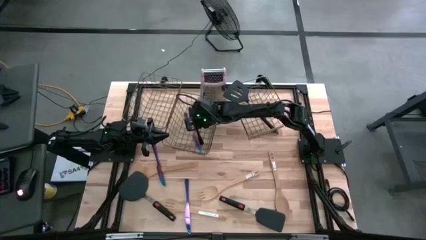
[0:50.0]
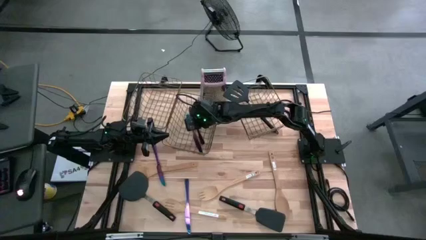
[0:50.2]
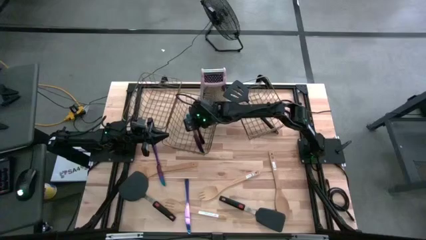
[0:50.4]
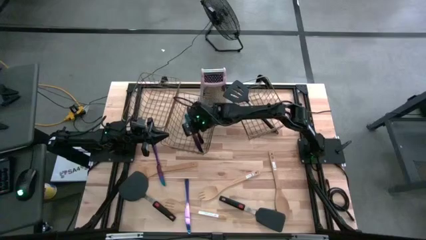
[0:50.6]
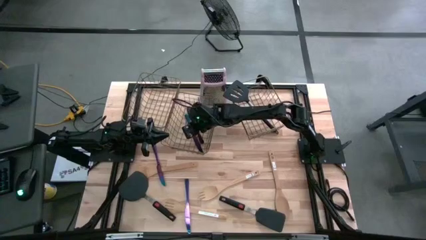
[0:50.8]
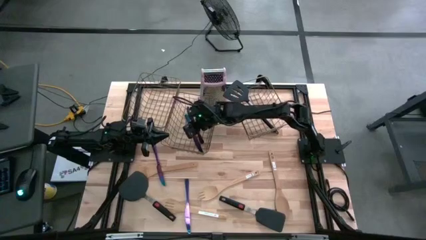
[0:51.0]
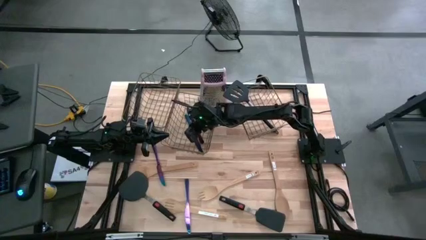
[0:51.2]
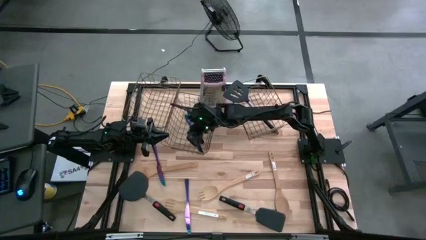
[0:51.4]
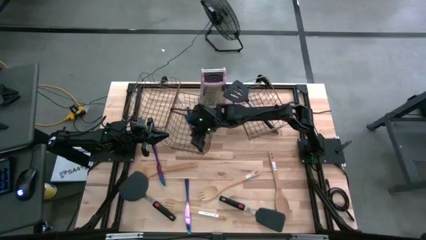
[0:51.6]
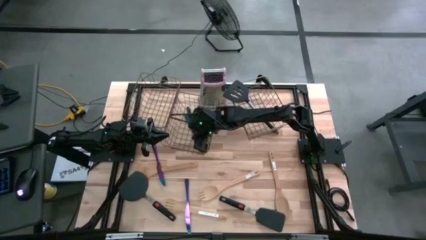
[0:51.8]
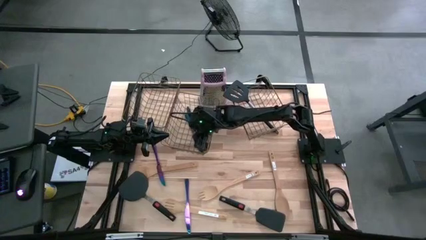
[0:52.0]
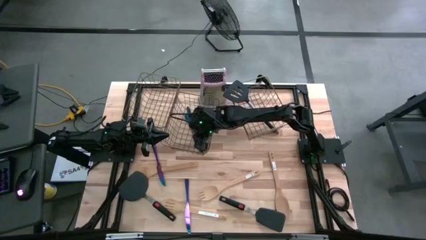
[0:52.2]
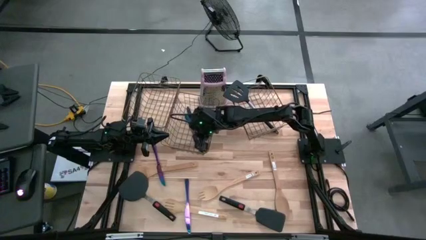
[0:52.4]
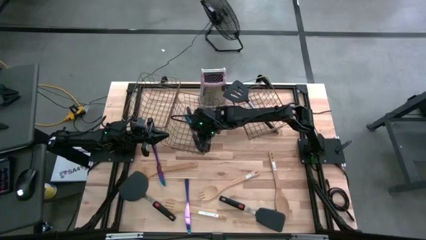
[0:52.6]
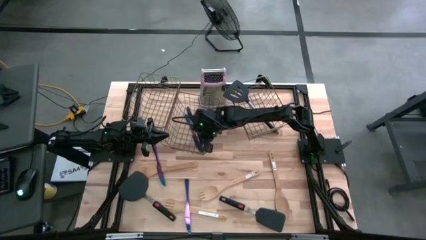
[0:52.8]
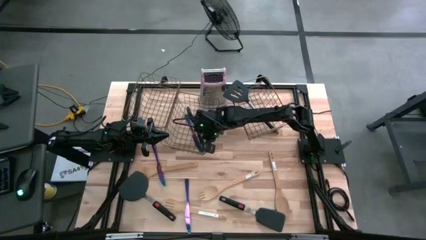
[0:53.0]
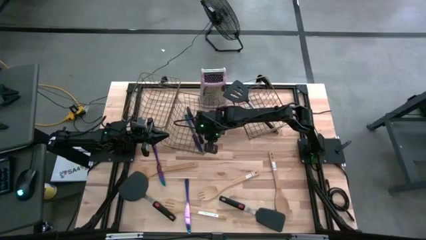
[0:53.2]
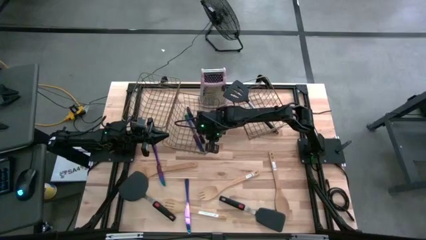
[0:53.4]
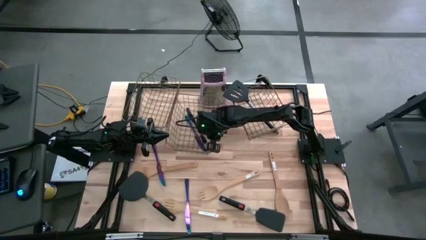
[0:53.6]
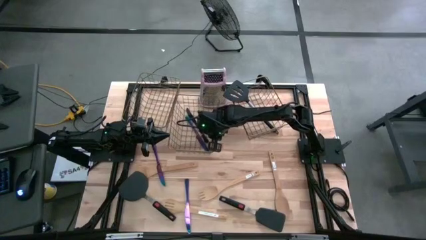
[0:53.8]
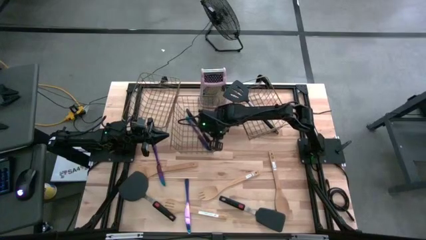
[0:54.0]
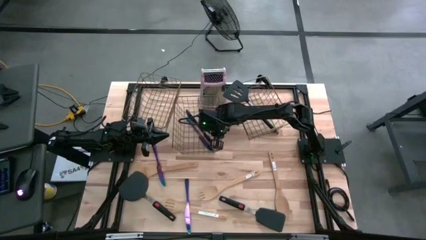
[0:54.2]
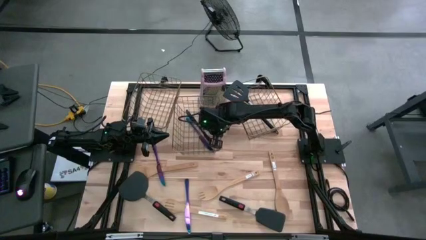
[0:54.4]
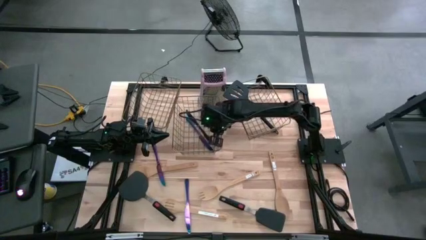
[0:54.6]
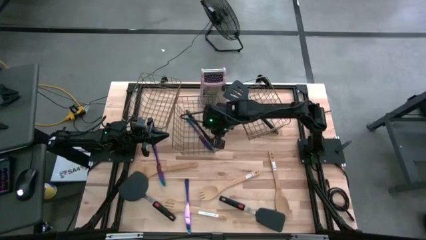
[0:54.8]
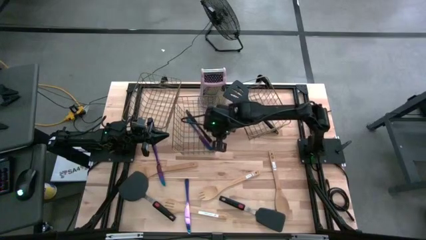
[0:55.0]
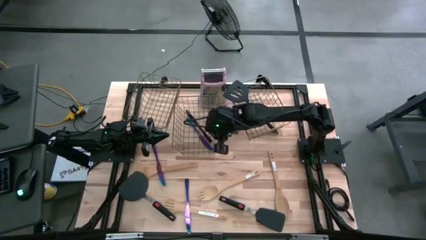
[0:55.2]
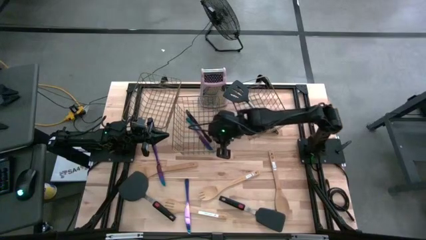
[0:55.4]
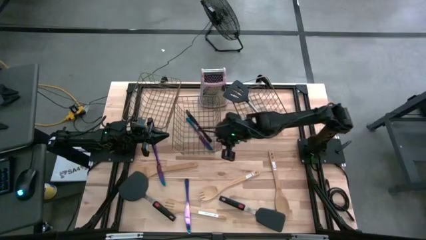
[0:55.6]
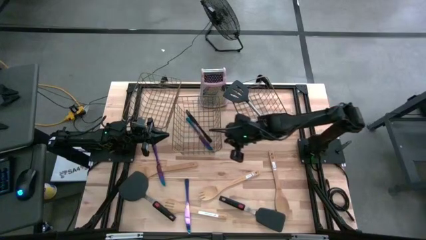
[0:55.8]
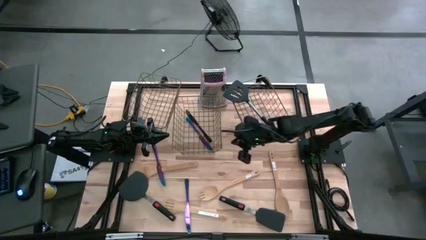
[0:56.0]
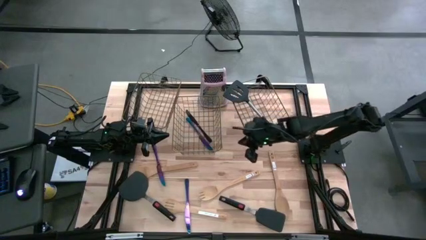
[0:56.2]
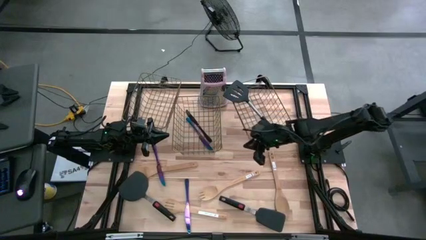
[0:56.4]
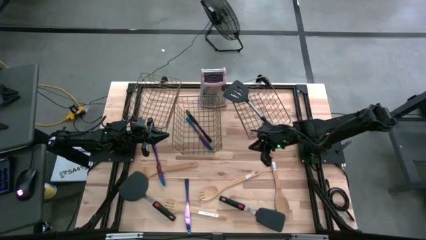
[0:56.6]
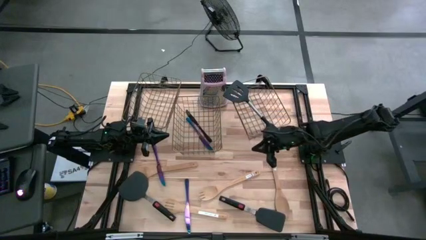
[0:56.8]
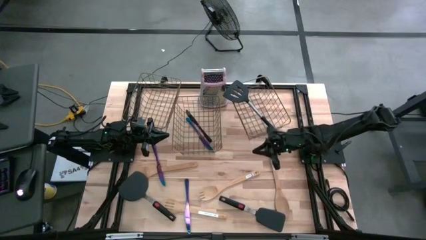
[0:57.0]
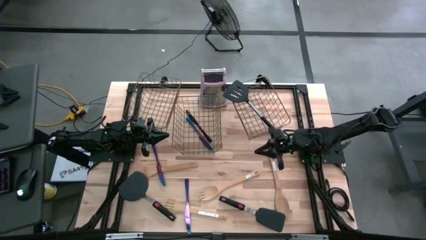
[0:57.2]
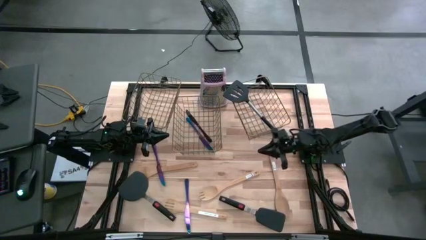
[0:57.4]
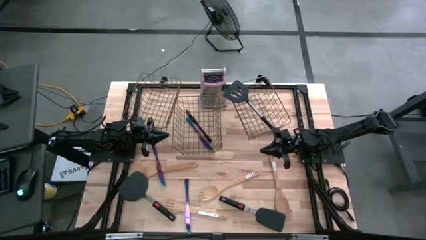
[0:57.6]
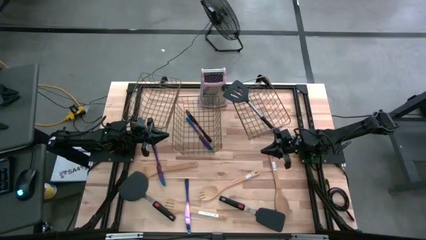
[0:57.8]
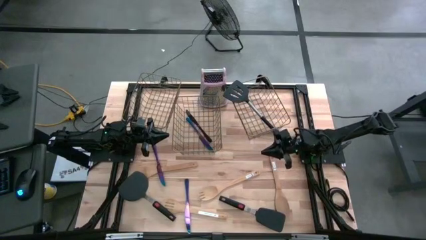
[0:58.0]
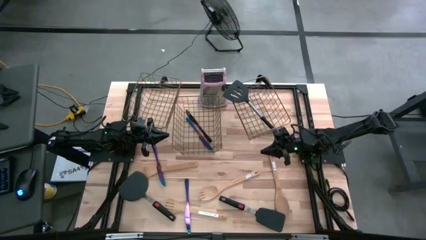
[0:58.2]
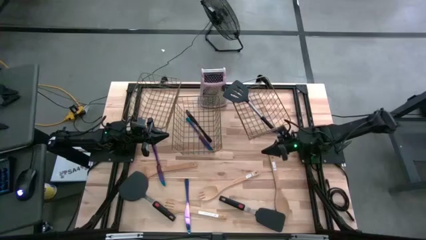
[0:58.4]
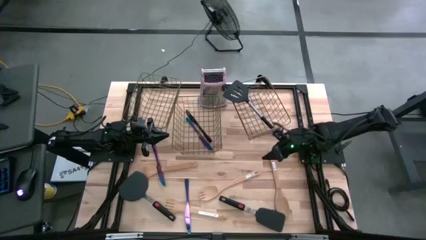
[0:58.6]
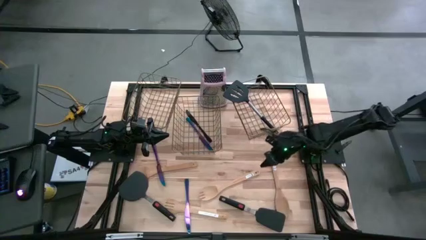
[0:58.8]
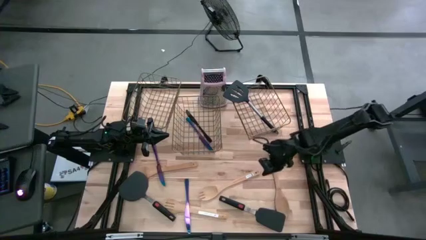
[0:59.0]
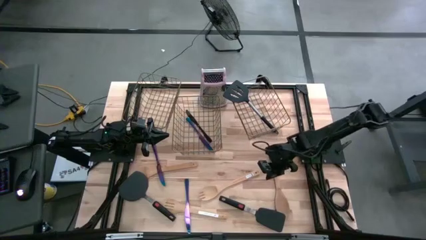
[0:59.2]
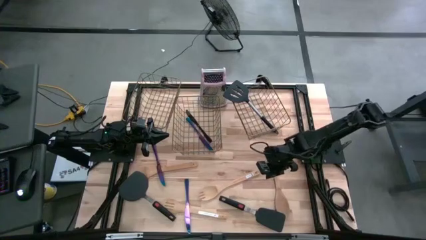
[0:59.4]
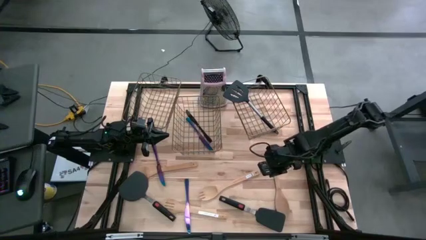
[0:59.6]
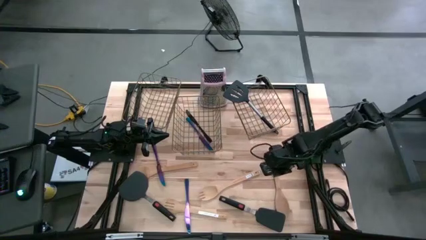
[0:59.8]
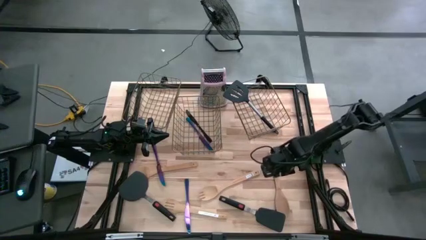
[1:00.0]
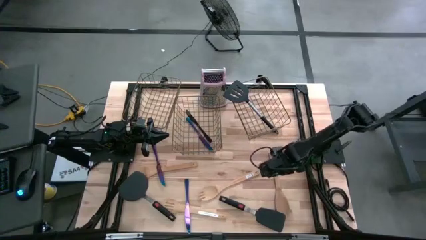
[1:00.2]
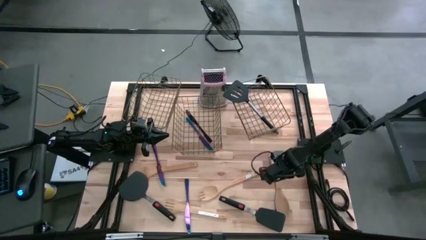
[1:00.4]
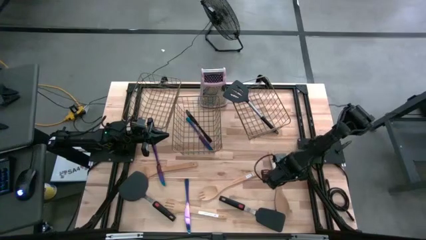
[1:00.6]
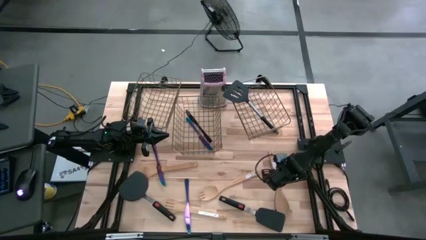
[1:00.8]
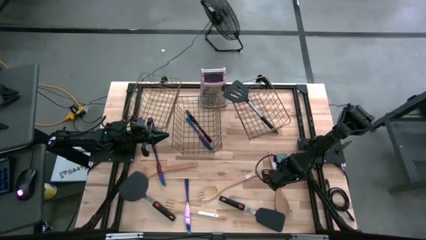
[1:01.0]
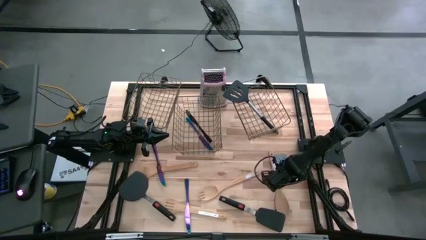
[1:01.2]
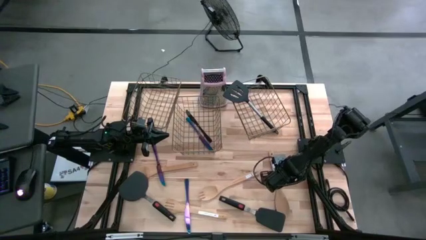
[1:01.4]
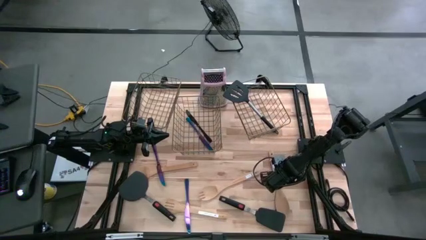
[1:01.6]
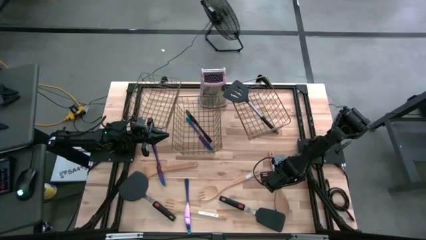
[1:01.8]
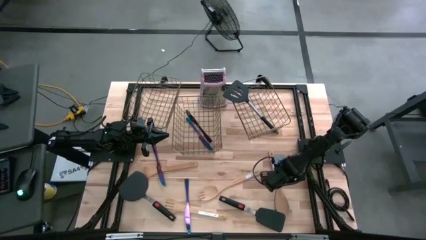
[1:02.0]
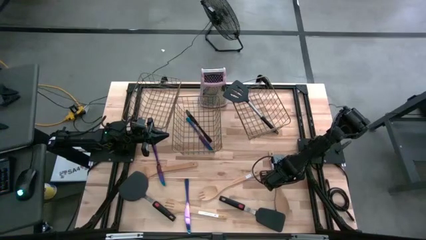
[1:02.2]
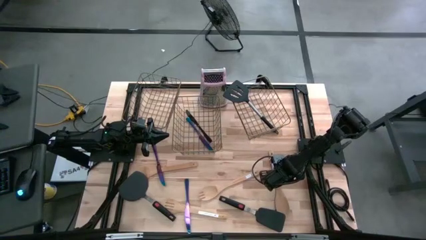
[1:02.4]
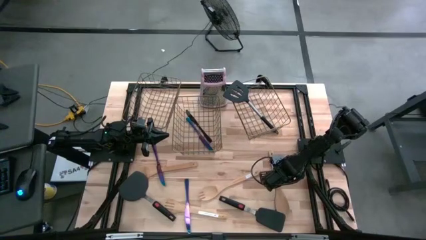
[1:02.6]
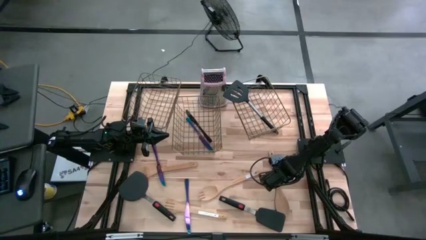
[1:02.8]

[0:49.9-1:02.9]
Task: Pick & Place Kitchen Items
Put the brown serving spoon into the left wire basket

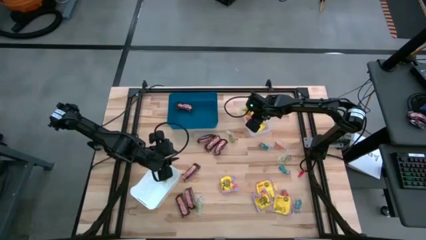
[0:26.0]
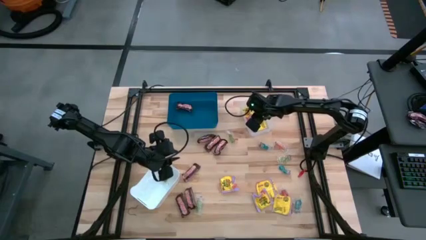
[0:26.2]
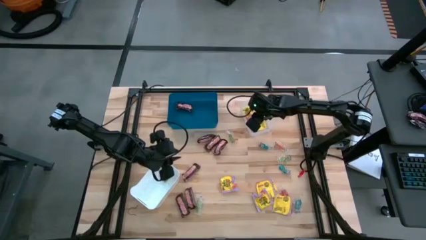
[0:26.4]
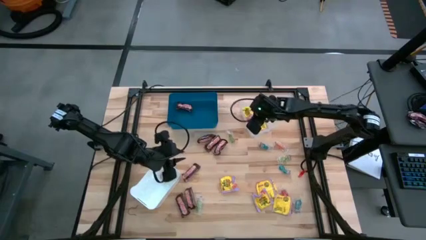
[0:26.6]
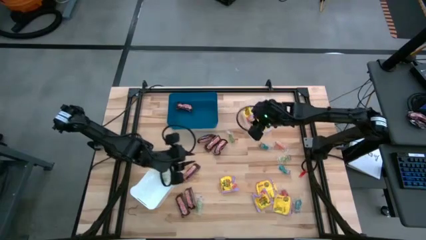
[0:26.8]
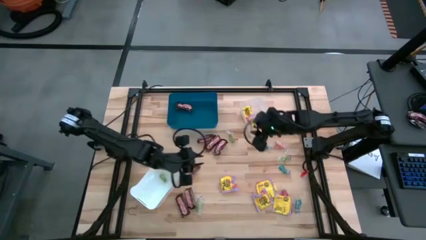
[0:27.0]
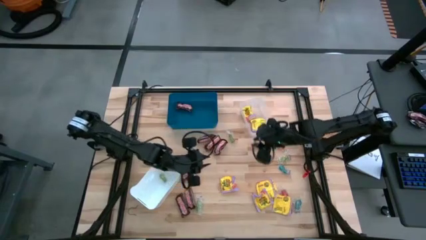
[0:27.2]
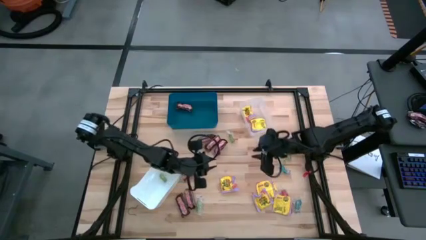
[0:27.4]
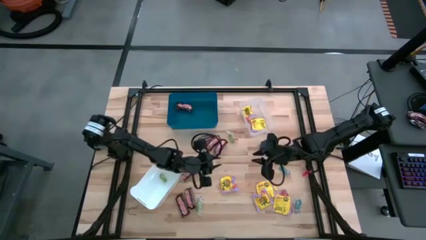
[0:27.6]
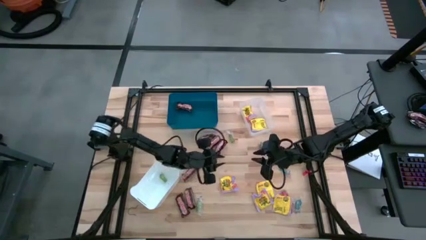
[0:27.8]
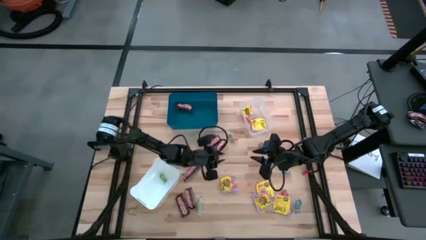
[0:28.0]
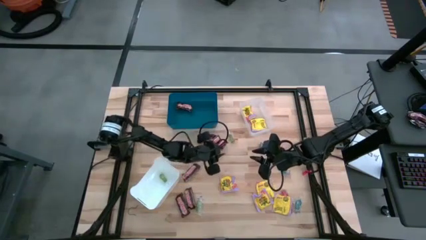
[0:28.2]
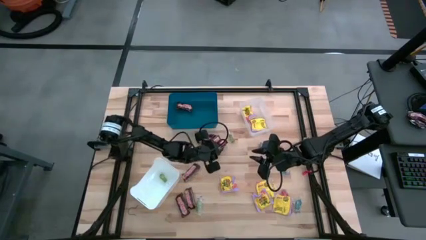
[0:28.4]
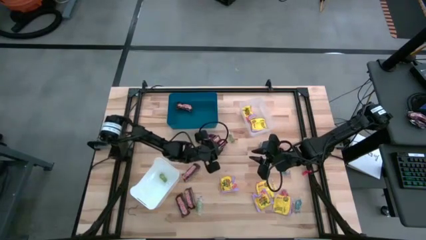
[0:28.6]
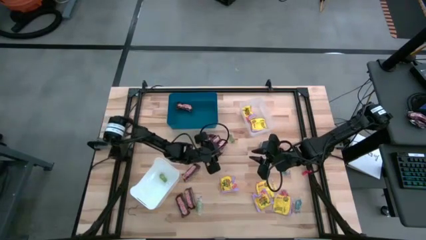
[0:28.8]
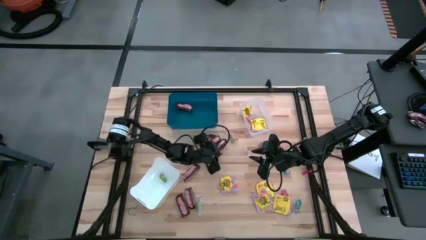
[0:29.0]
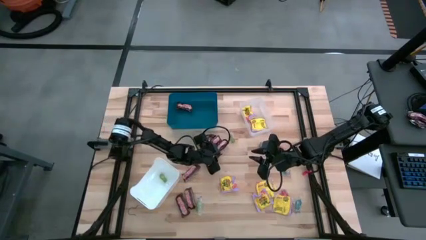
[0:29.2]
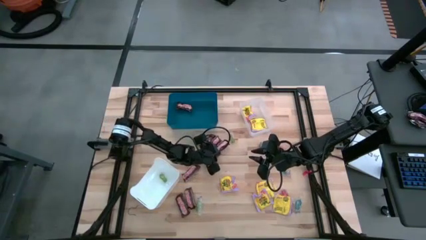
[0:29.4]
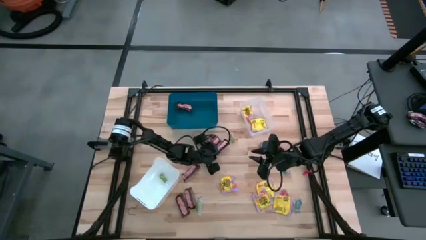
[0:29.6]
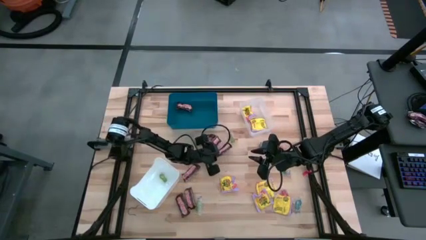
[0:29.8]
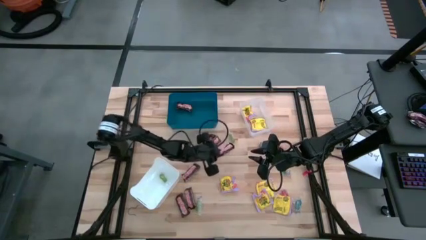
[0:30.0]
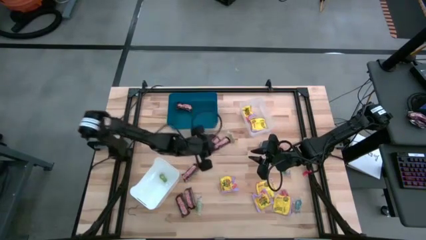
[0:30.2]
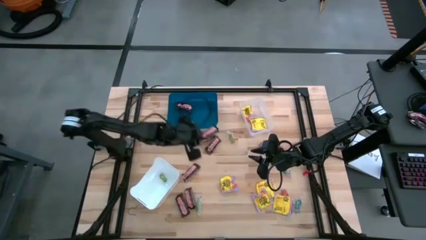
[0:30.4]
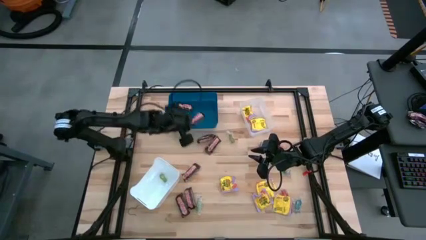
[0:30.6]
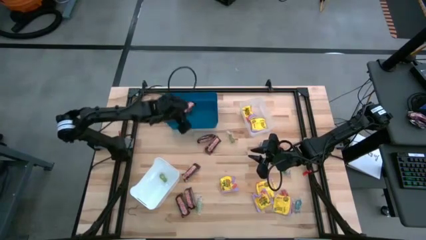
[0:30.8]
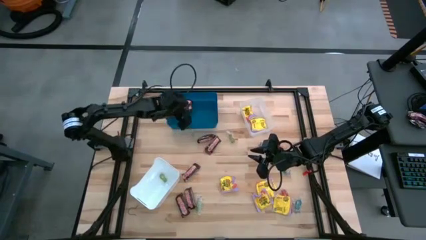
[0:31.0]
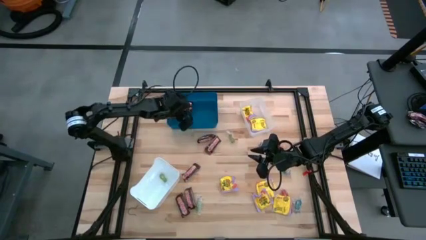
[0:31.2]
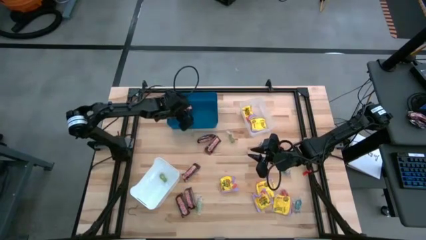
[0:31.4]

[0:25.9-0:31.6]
Task: Sort candy
Put the brown chocolate into the blue bin
